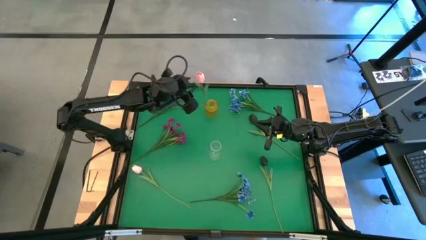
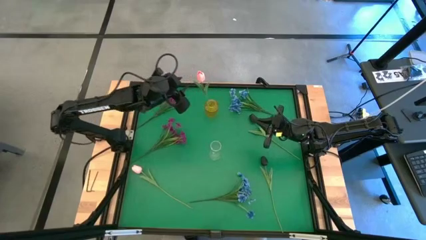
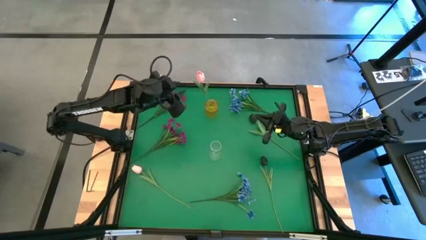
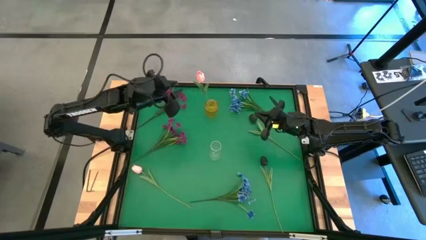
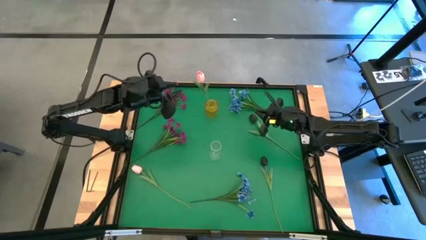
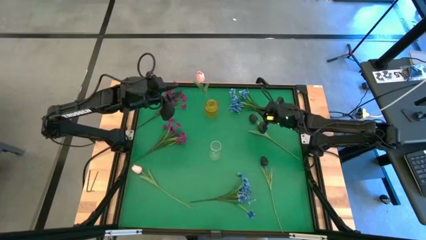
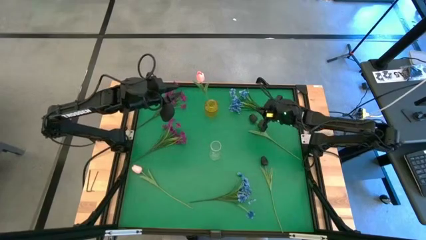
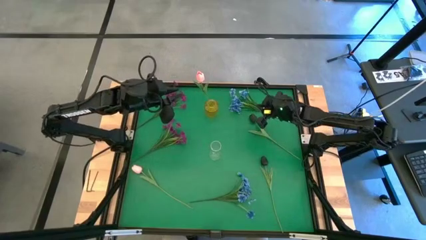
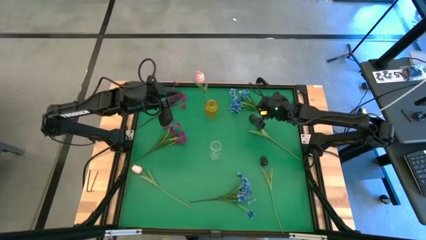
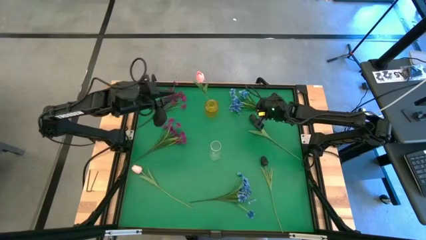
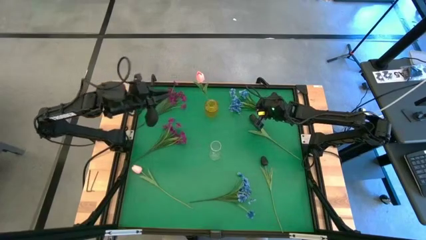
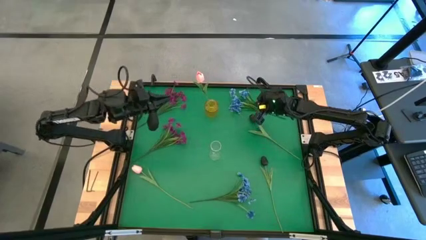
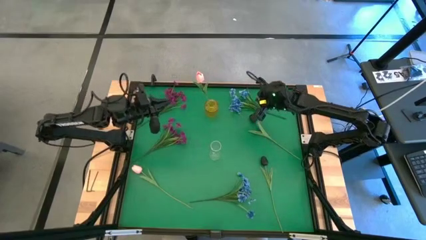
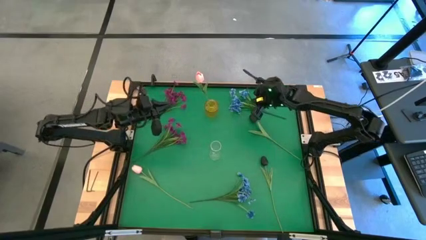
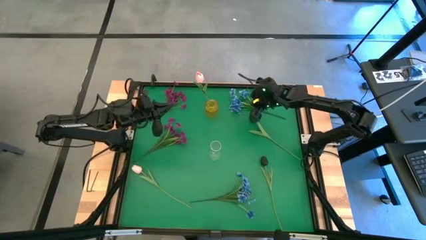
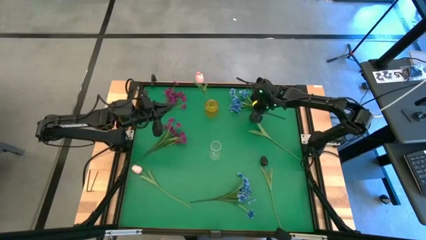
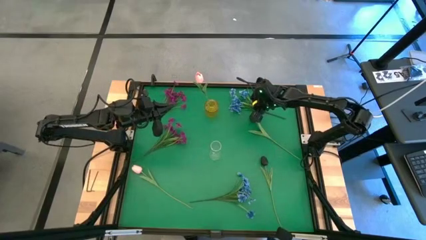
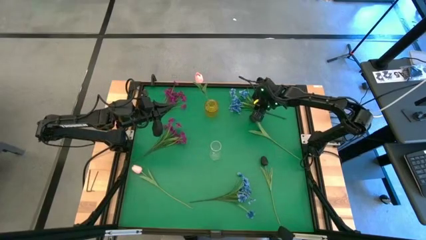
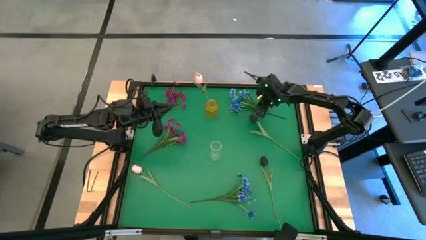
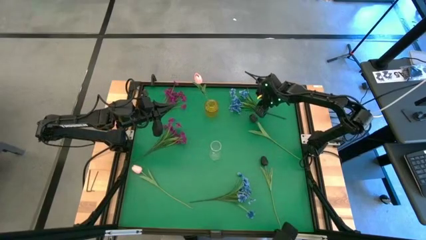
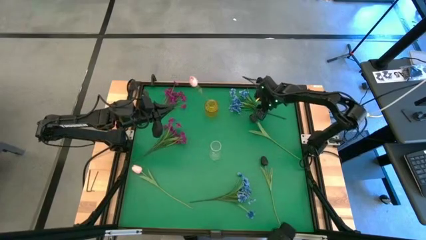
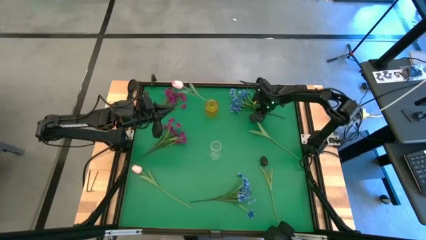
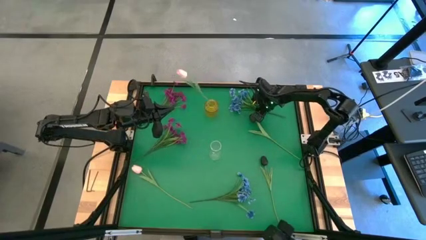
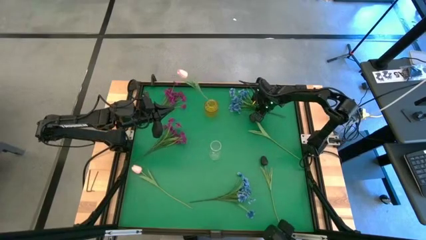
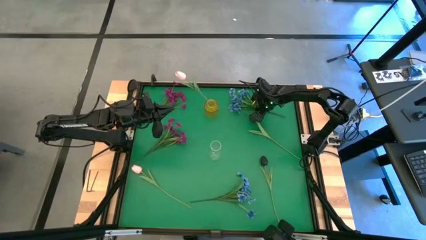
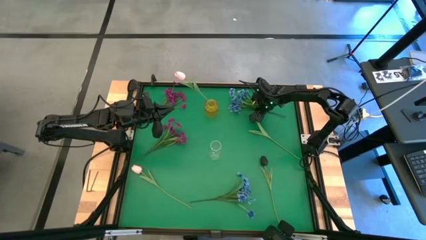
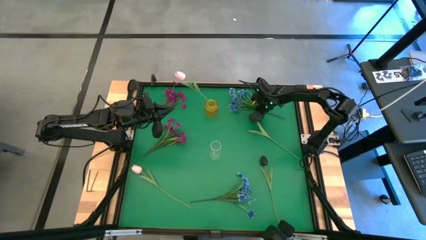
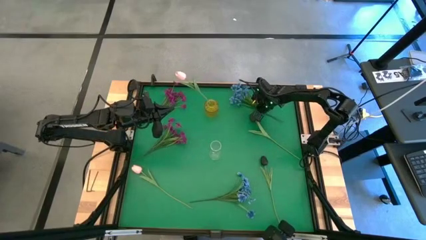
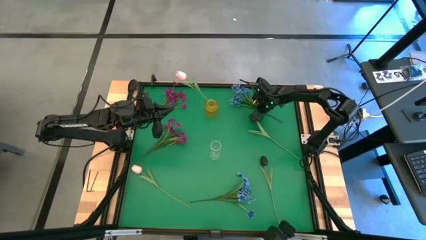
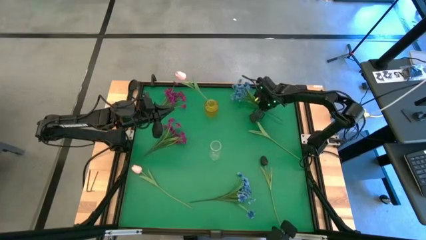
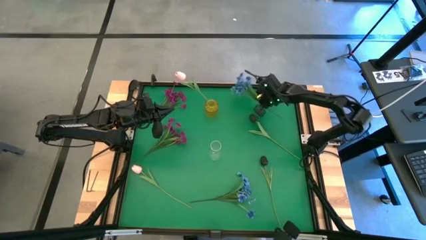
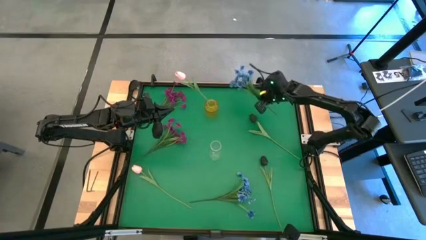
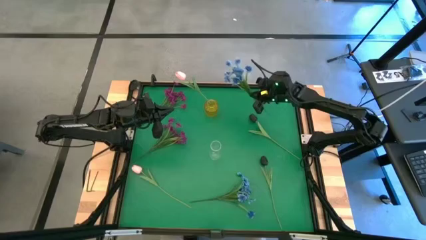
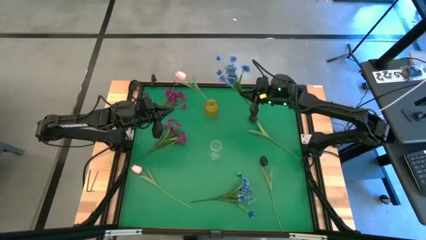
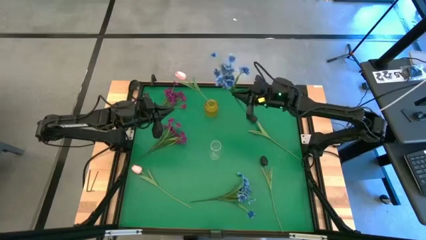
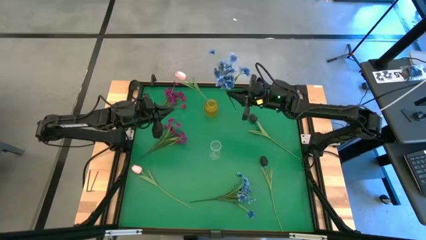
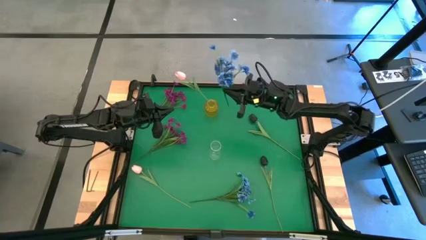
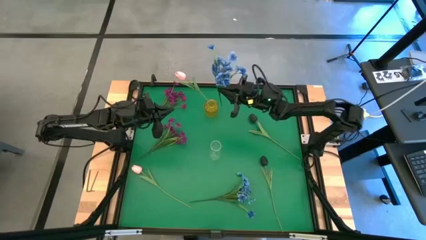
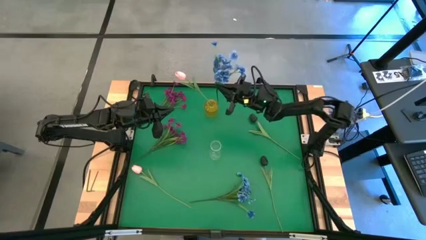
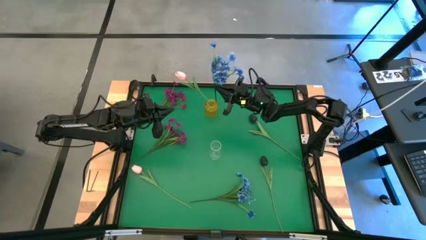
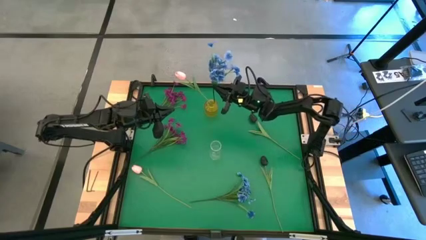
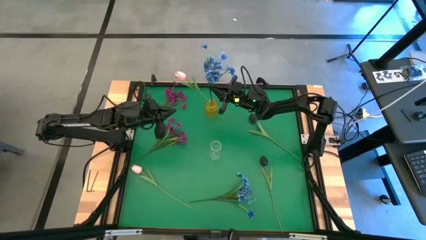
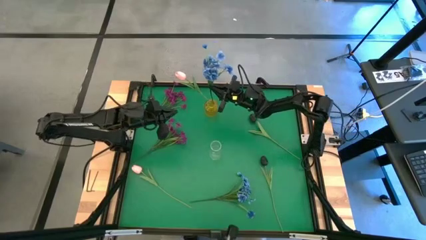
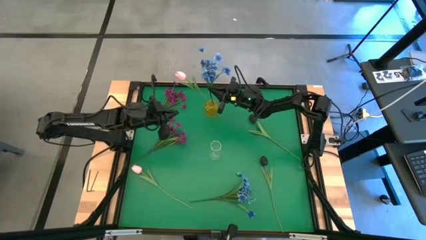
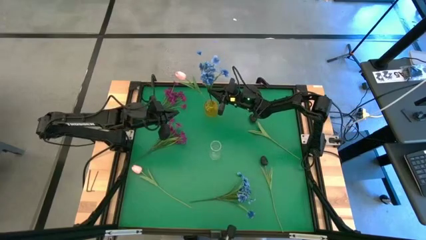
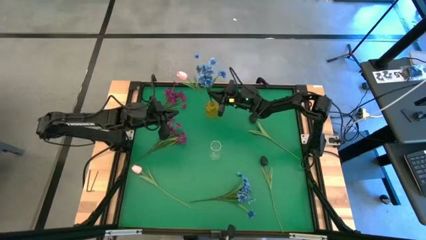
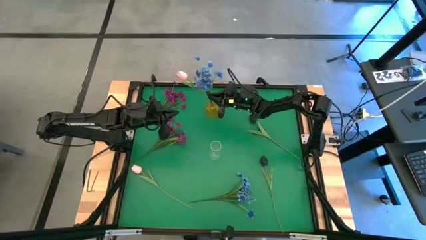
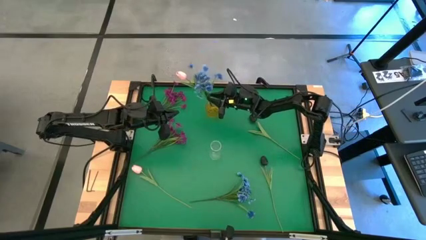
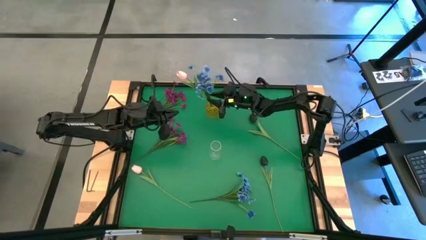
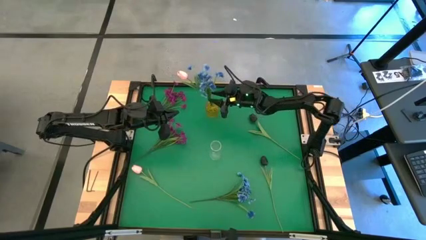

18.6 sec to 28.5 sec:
Task: Sort flowers into vase by color
Put the top blue flowers into the yellow vase

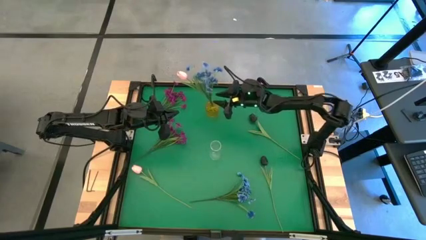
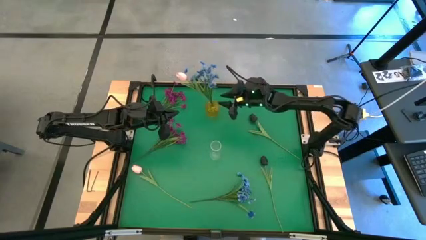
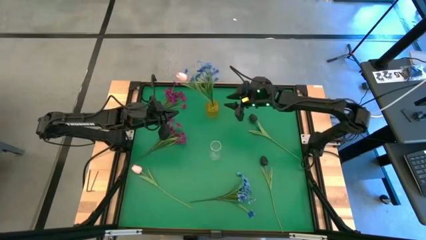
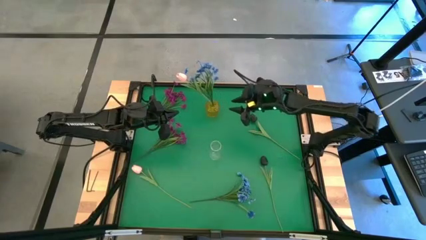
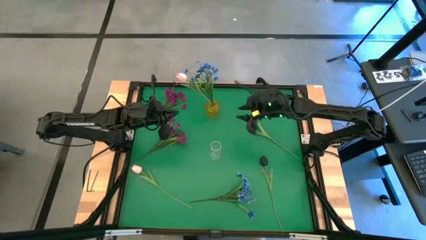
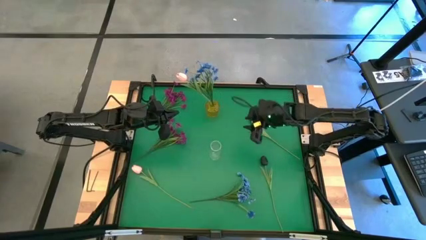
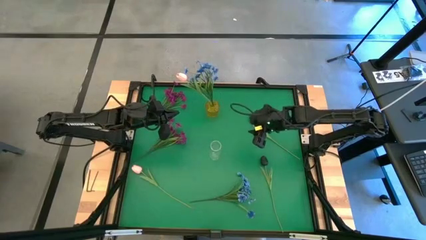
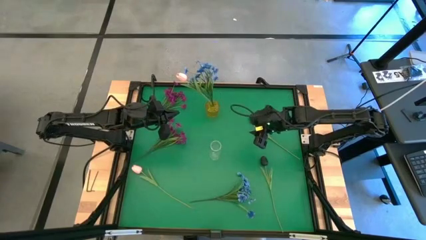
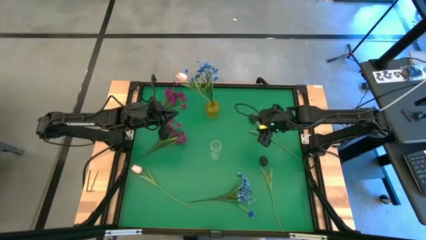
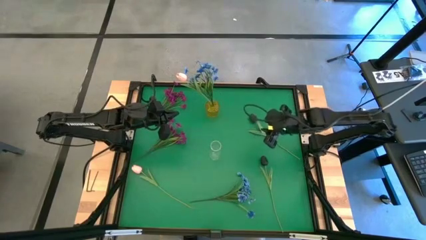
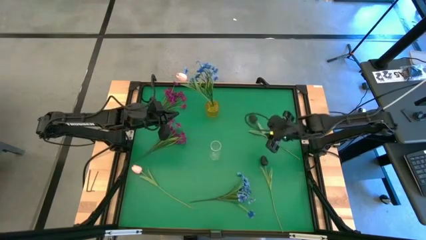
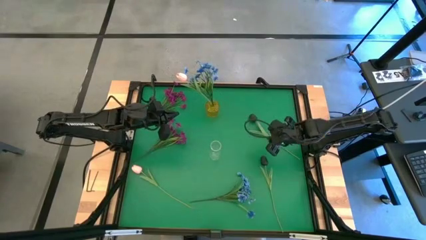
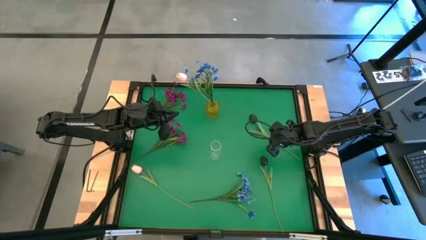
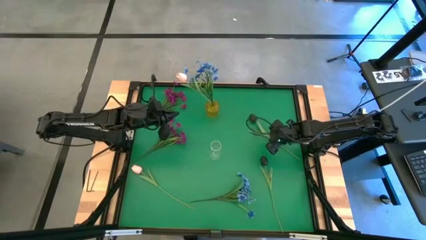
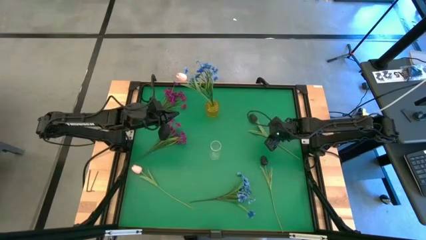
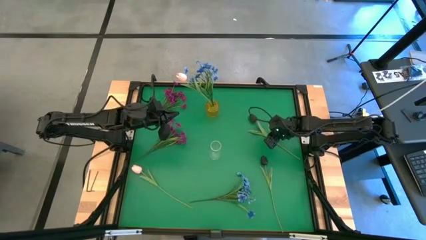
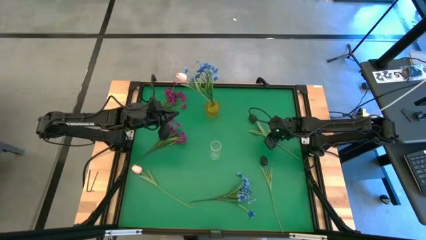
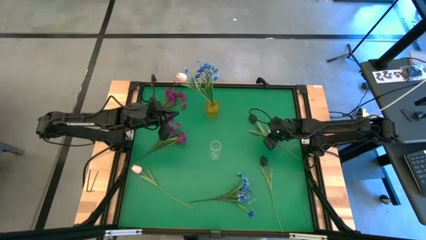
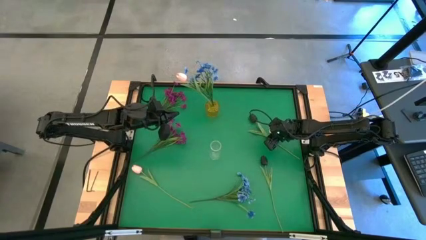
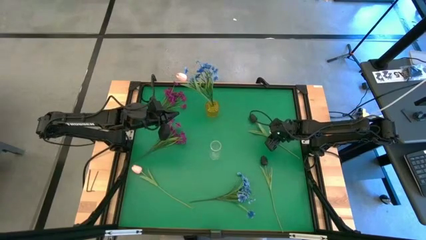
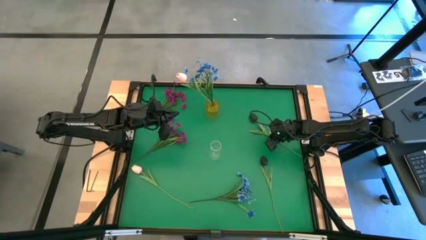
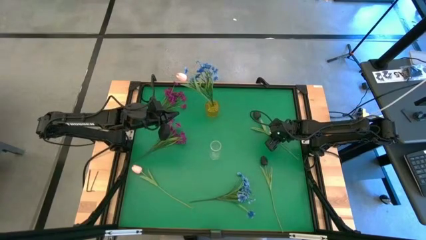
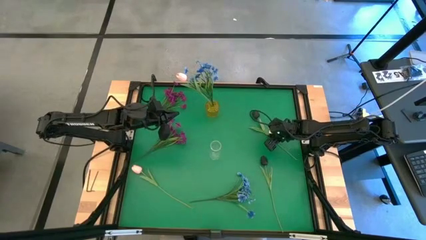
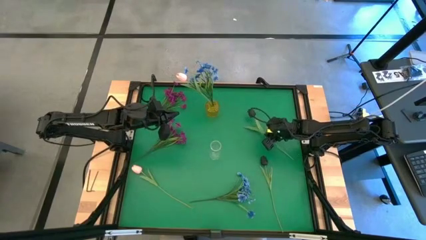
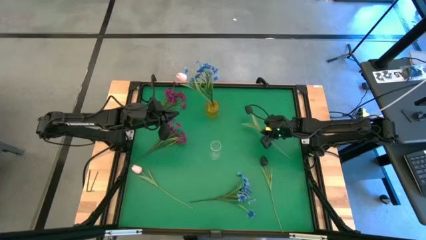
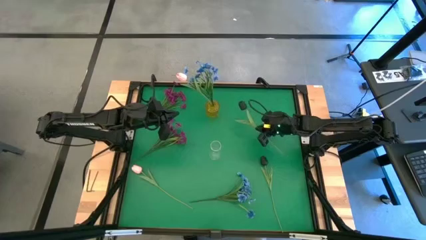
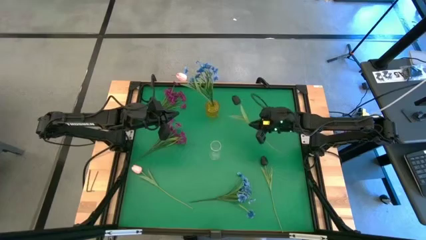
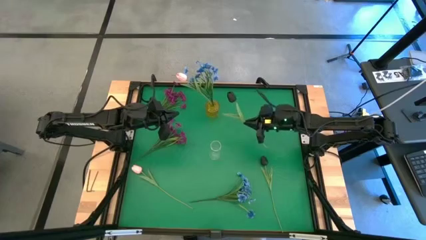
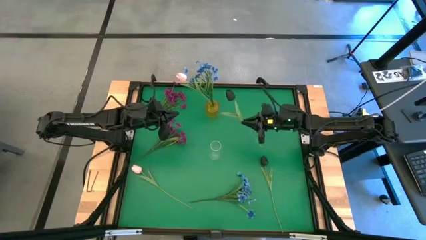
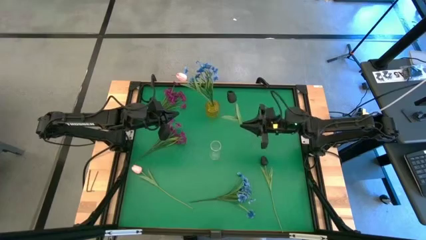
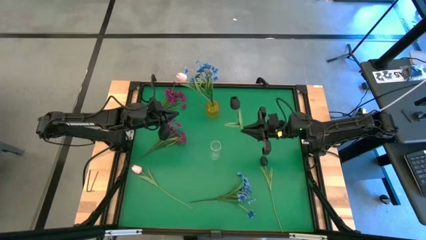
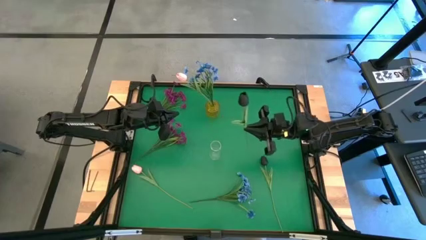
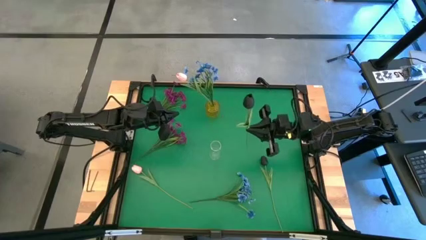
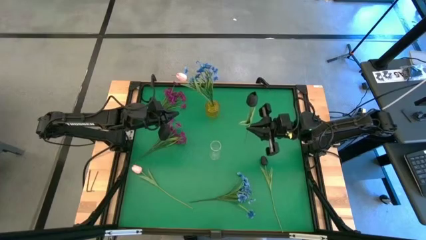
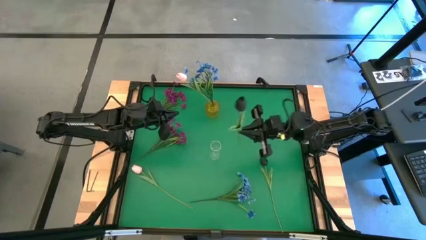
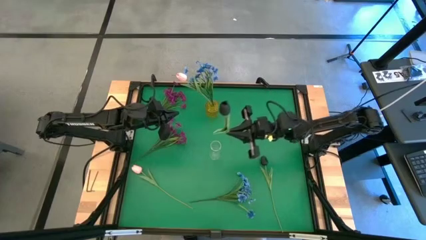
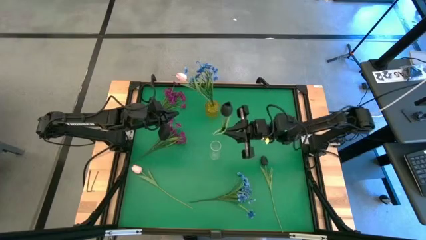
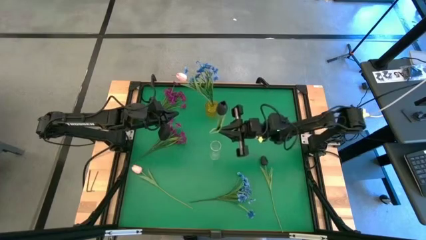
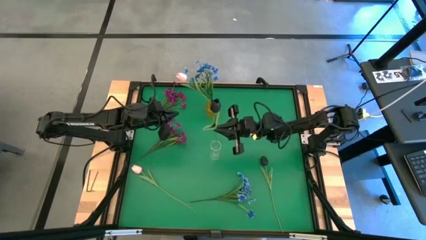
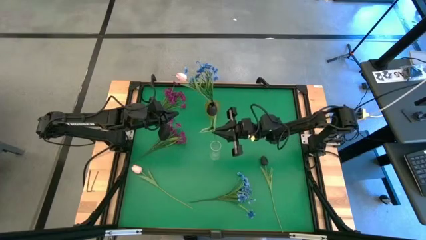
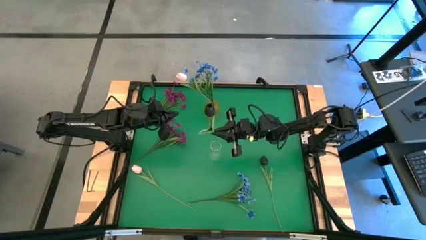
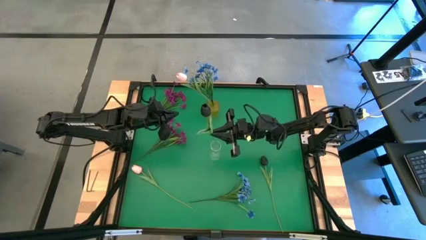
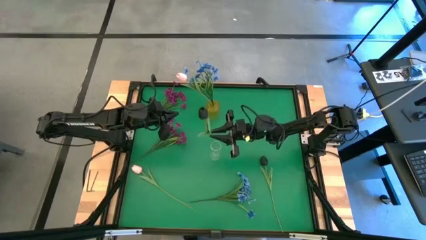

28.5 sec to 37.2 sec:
Put the top black flower into the transparent vase
